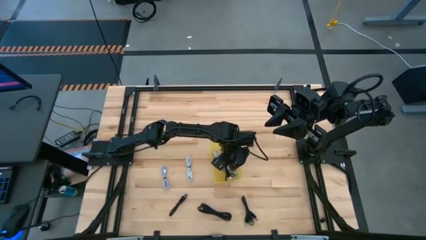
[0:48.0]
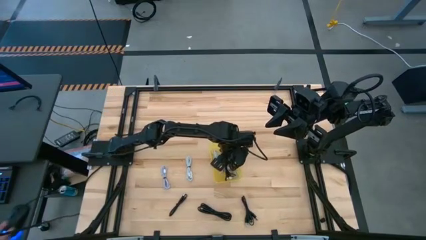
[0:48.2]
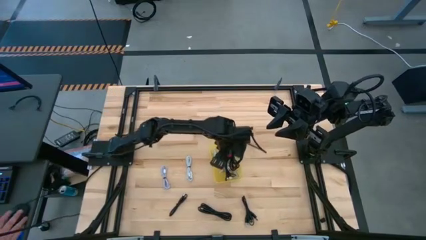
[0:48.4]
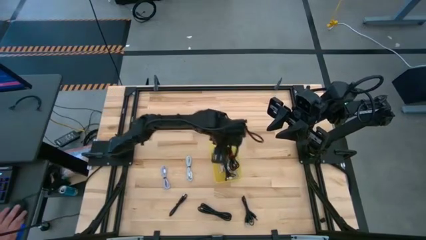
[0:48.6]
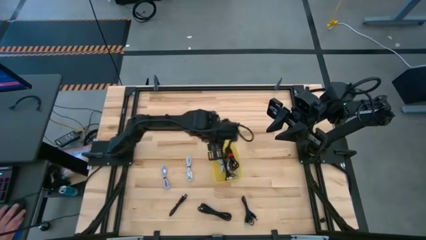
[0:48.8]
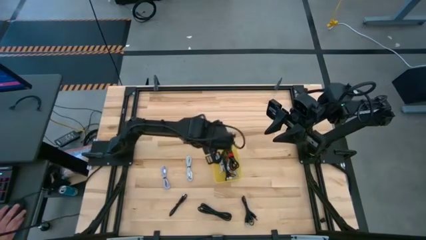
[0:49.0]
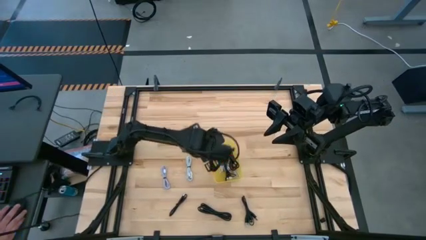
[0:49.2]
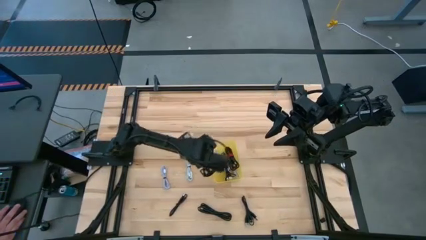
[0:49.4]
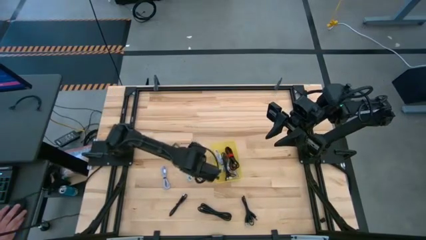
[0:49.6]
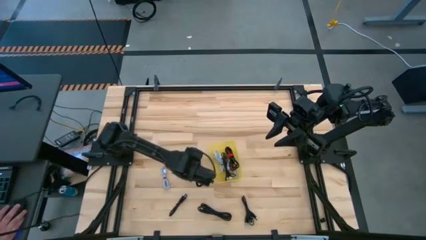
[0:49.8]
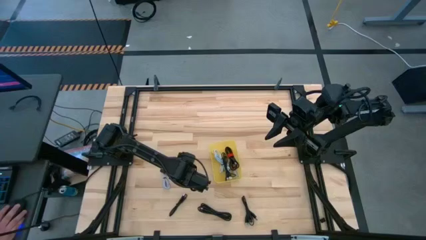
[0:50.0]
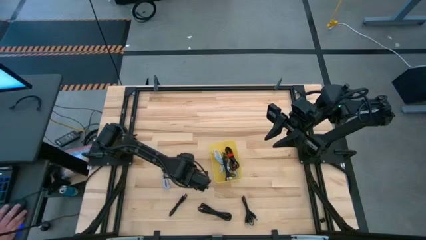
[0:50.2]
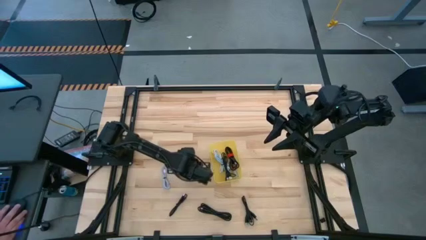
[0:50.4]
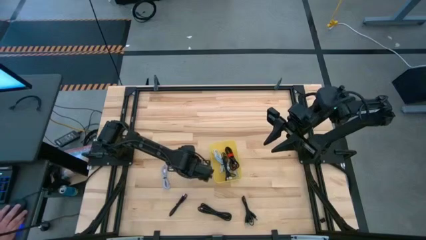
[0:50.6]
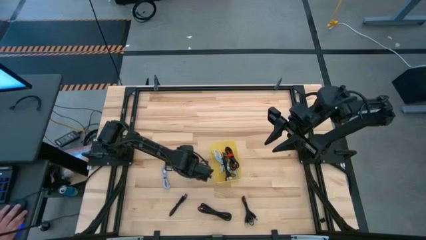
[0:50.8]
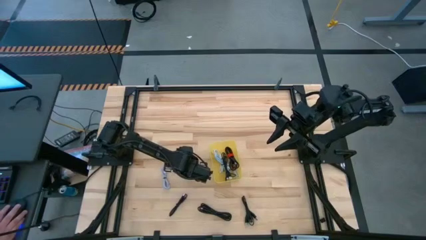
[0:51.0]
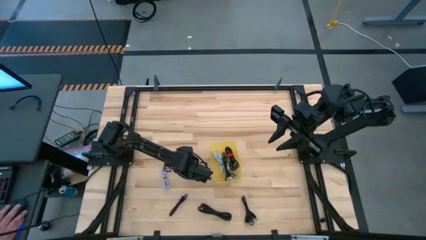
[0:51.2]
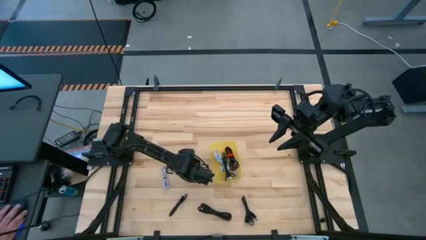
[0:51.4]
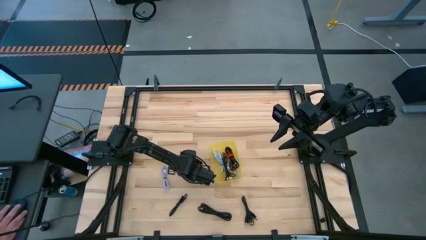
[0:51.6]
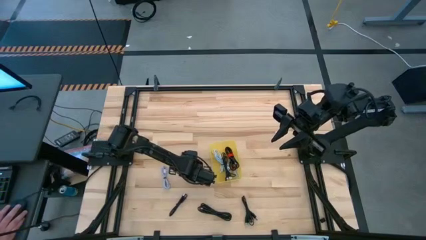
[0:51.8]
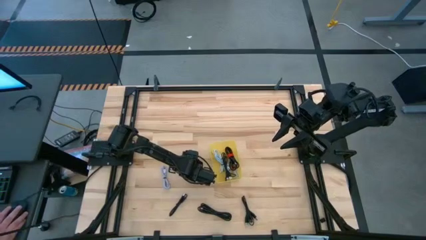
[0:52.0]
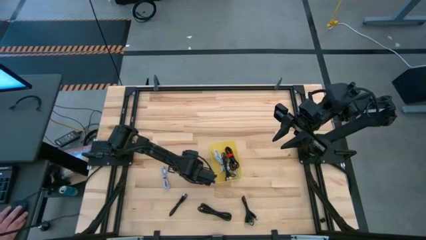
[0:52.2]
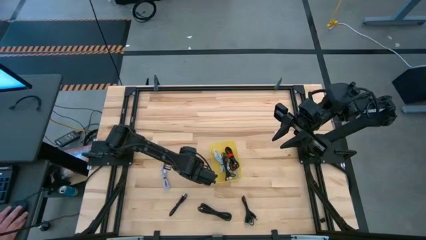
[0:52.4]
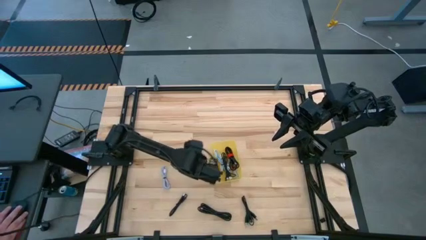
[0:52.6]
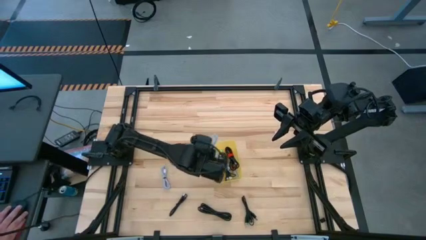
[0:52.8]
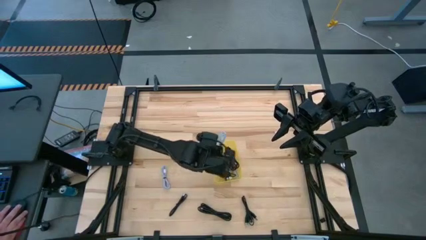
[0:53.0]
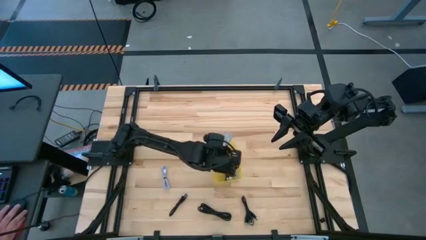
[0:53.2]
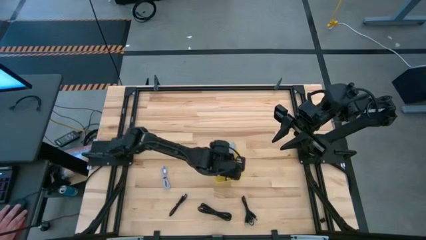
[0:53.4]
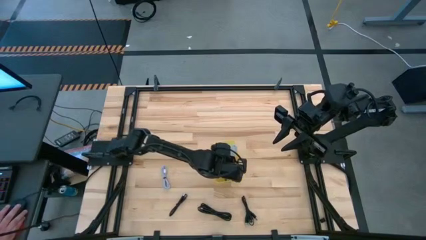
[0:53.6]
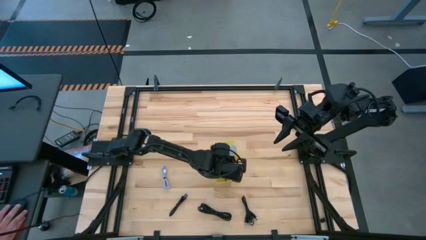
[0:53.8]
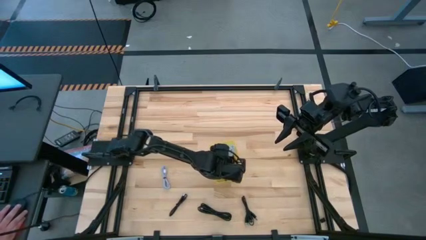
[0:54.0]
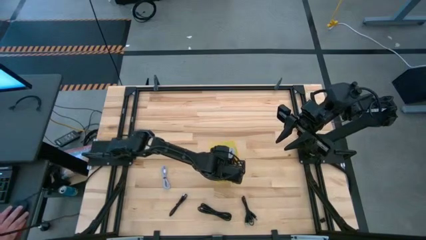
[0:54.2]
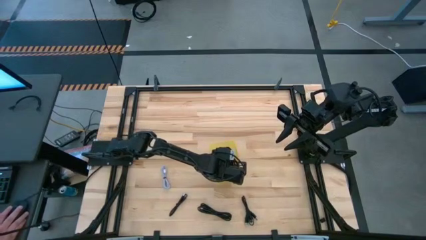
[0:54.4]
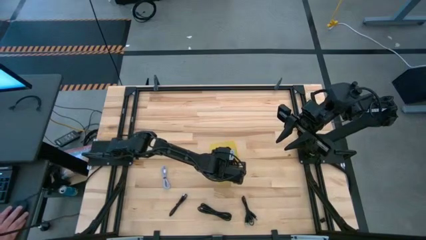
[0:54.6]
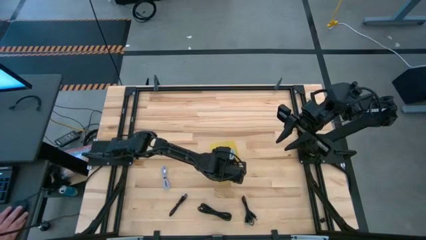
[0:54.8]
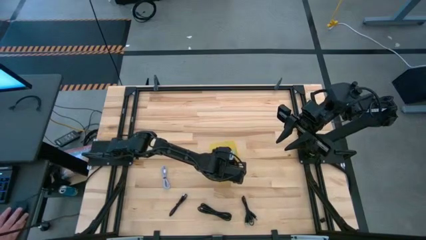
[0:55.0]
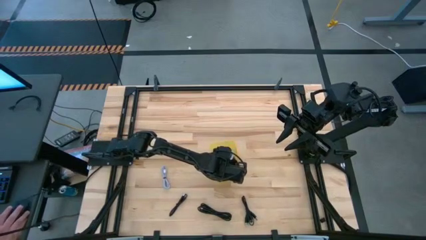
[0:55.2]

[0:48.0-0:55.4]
Task: Pick and place USB-C Cables
Put the blue charger cable into the yellow bin

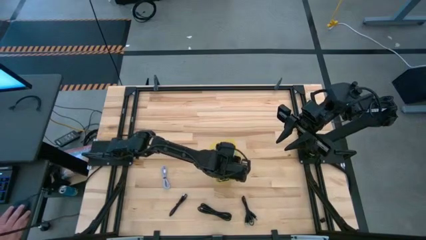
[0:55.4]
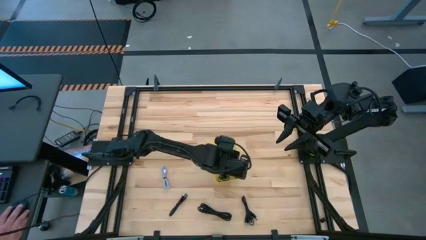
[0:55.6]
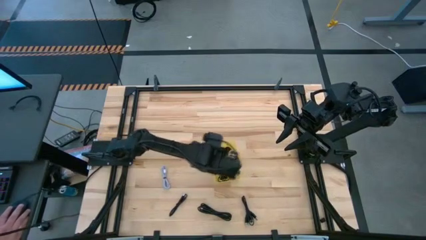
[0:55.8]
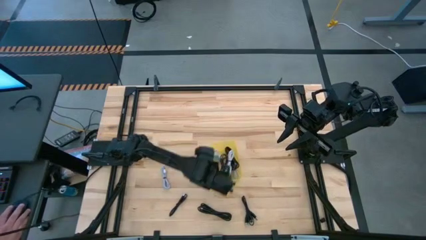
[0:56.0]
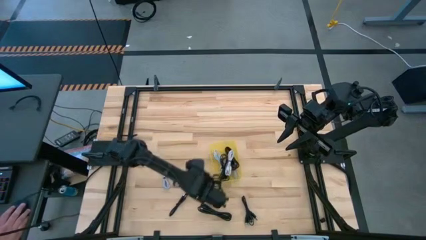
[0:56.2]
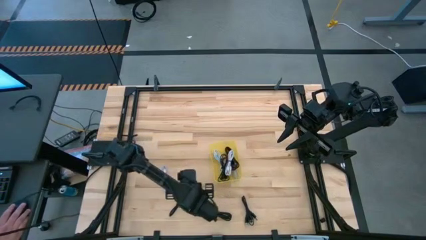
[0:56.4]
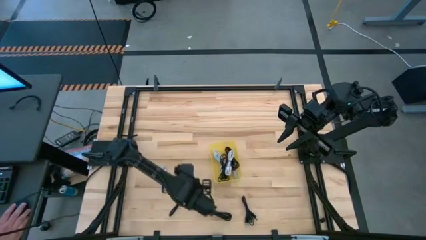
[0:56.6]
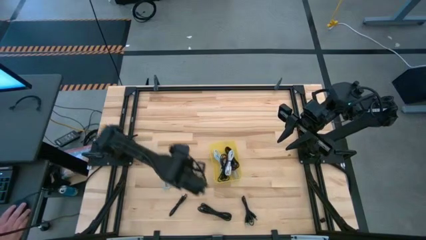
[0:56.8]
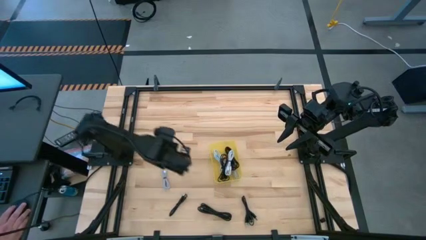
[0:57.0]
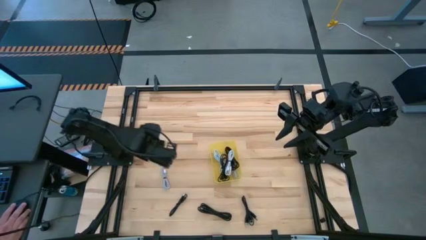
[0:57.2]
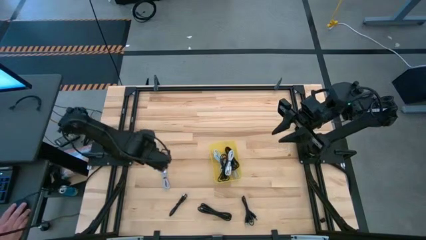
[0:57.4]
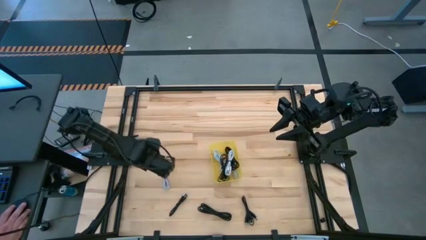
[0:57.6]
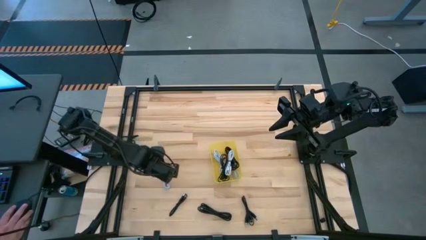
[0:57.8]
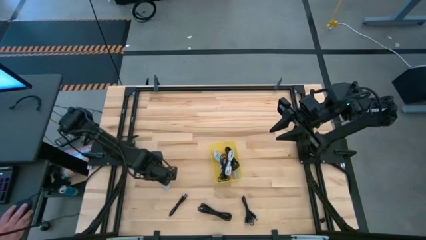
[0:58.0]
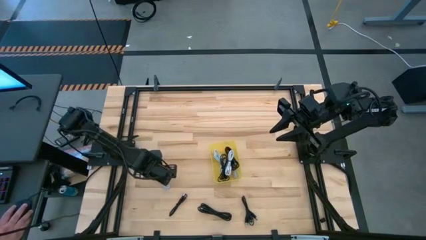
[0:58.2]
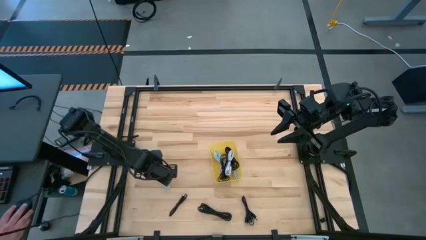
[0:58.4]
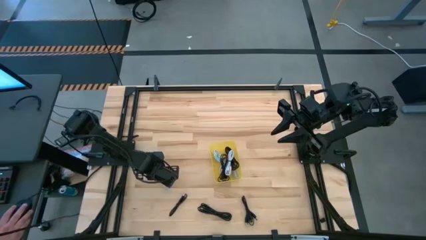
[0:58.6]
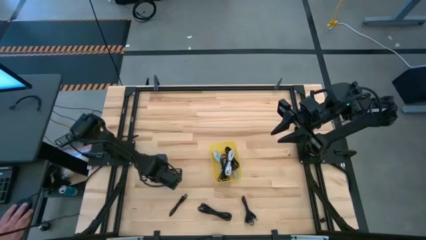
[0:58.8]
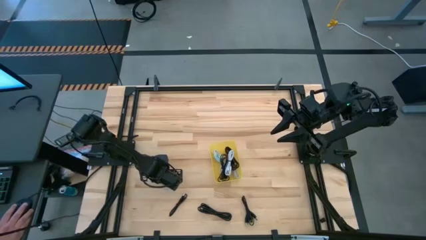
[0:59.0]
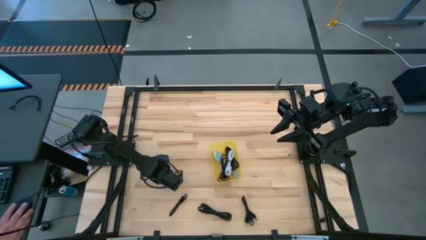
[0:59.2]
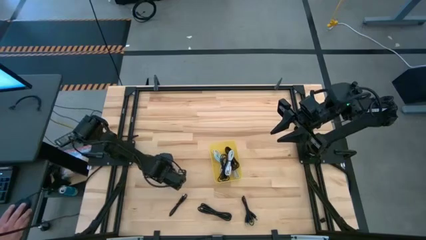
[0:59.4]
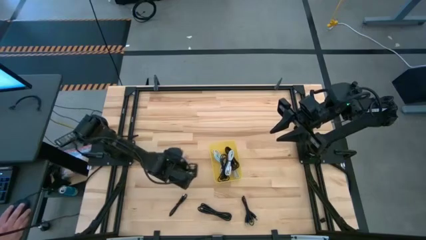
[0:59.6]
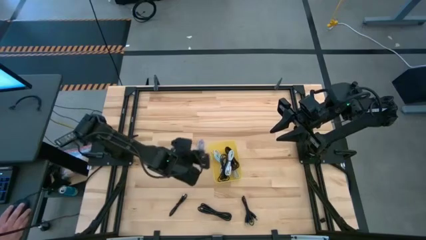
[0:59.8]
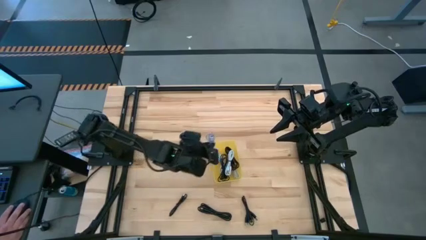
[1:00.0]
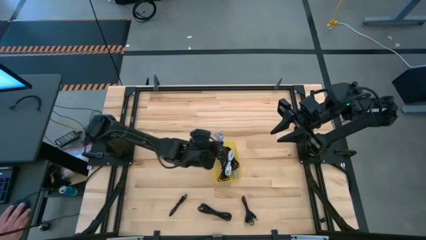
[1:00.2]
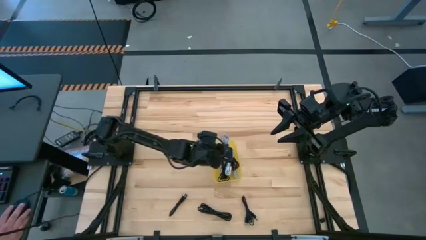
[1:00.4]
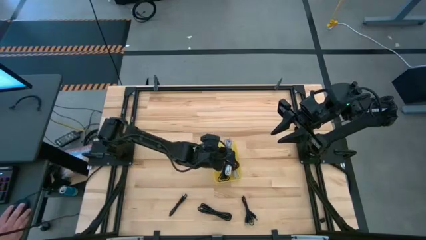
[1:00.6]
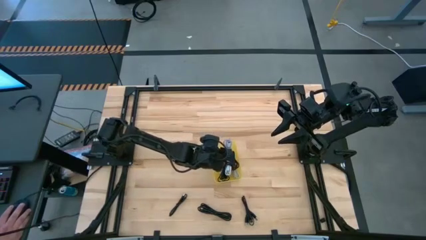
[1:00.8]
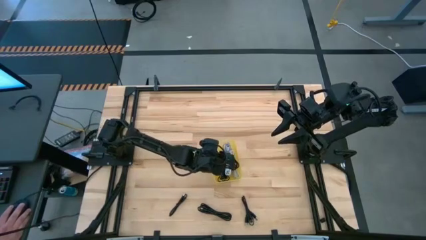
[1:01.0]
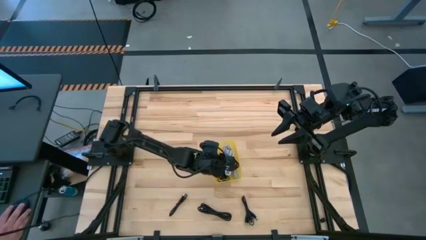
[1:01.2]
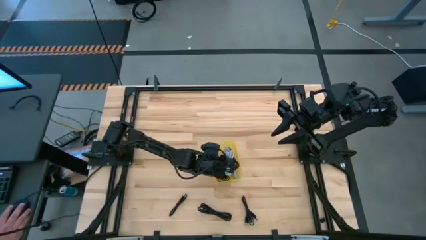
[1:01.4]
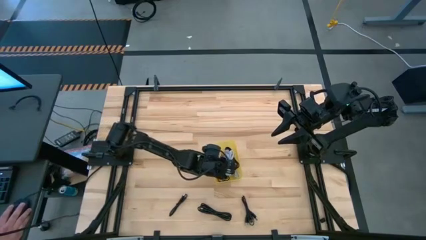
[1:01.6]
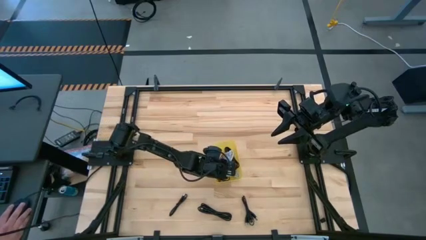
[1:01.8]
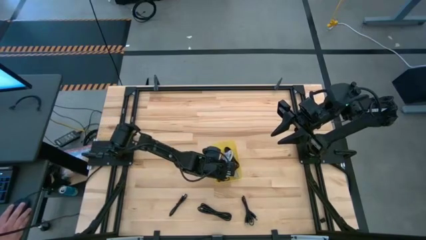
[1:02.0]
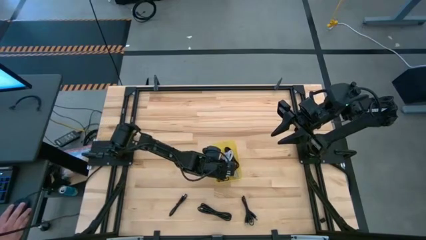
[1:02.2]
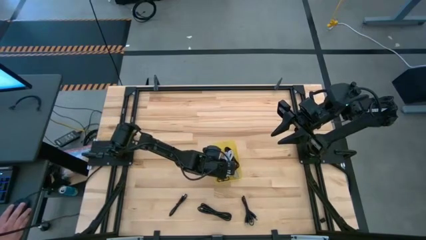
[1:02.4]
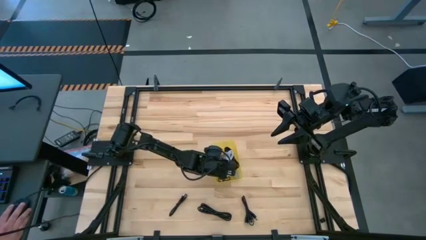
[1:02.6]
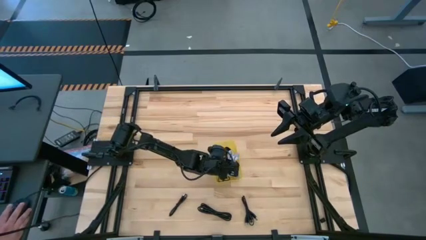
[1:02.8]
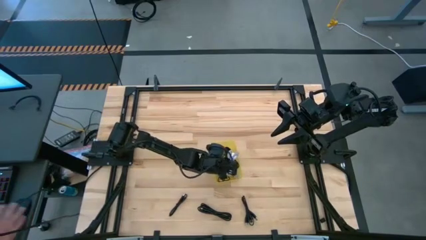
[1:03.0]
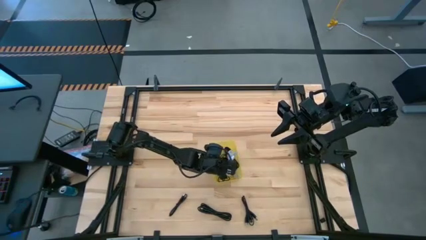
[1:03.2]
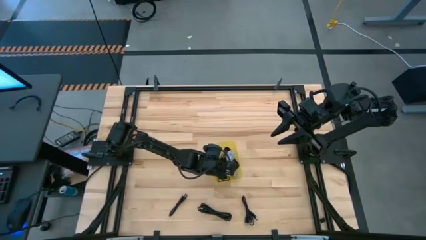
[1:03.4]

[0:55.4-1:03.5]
Put the purple charger cable into the yellow bin
